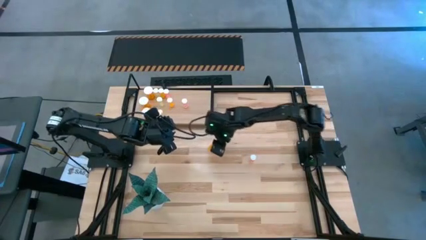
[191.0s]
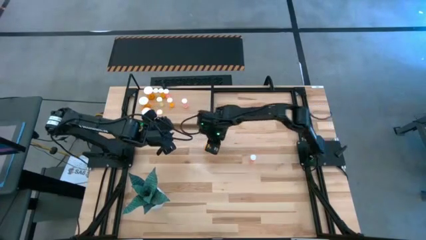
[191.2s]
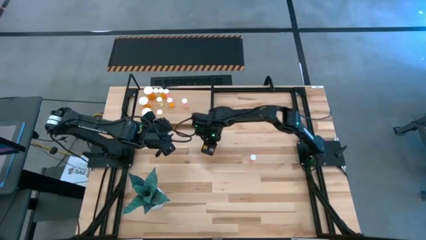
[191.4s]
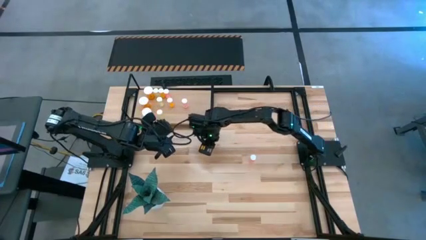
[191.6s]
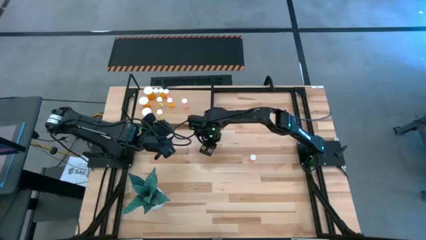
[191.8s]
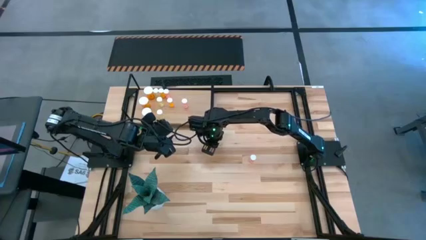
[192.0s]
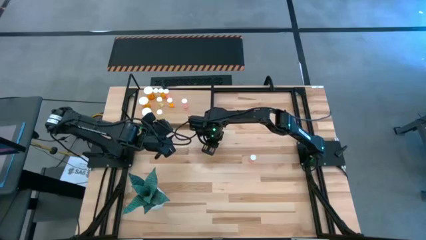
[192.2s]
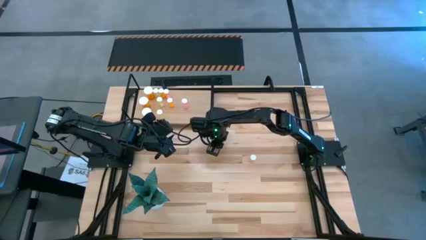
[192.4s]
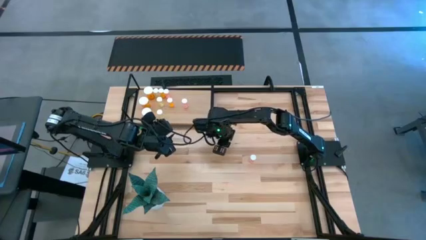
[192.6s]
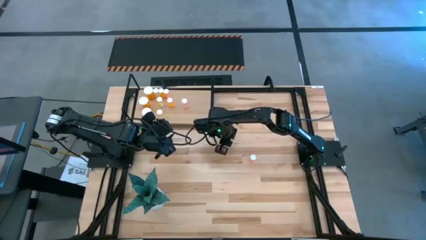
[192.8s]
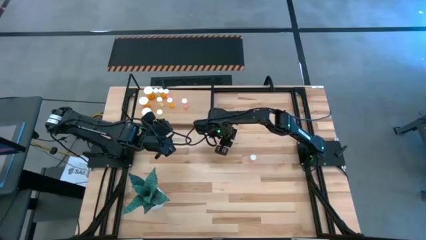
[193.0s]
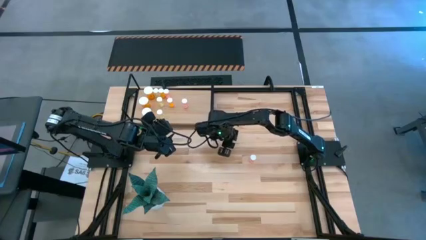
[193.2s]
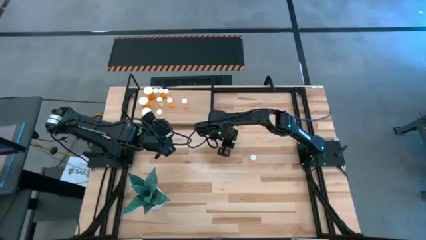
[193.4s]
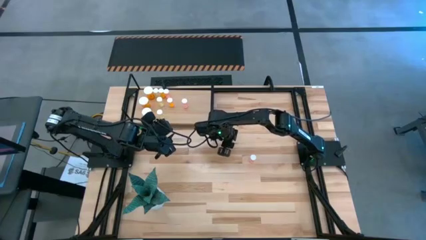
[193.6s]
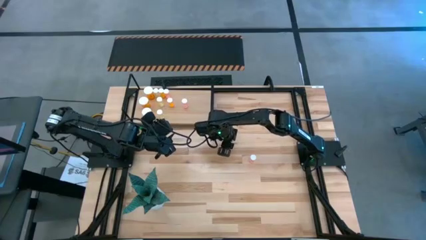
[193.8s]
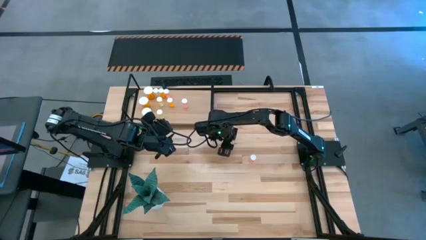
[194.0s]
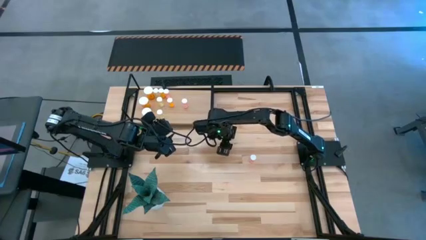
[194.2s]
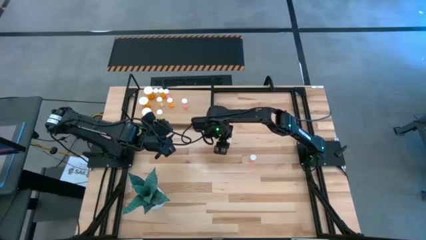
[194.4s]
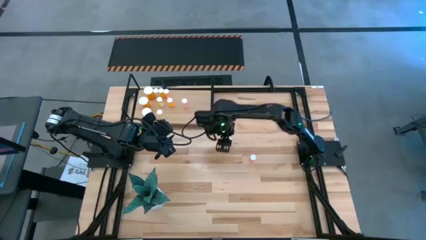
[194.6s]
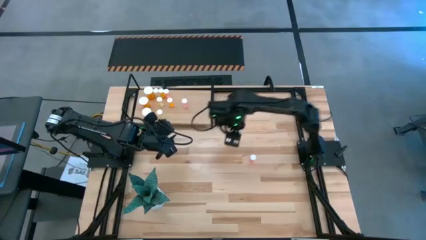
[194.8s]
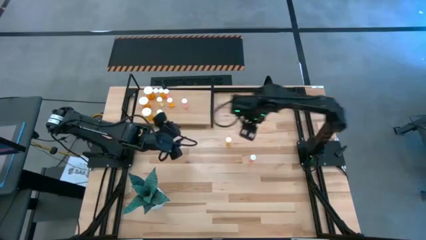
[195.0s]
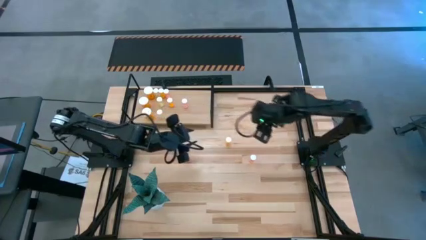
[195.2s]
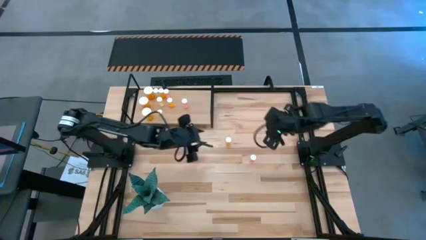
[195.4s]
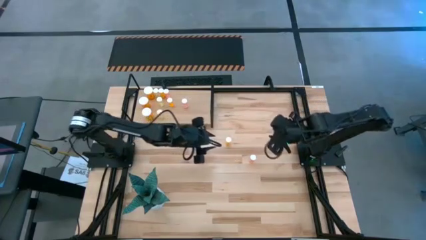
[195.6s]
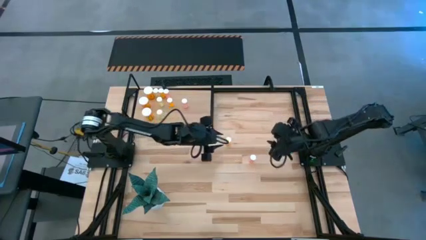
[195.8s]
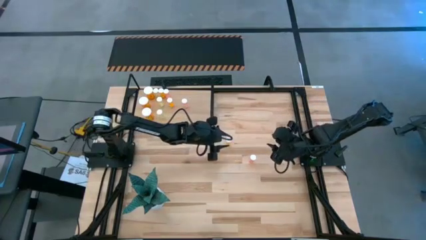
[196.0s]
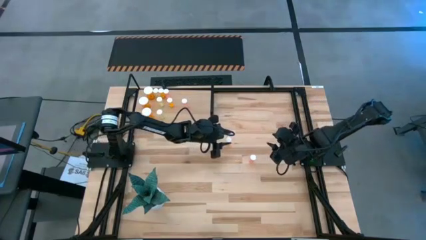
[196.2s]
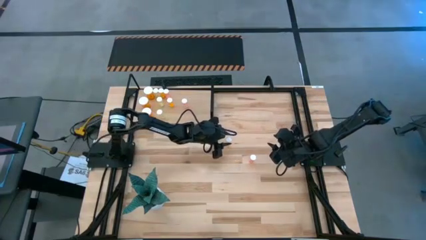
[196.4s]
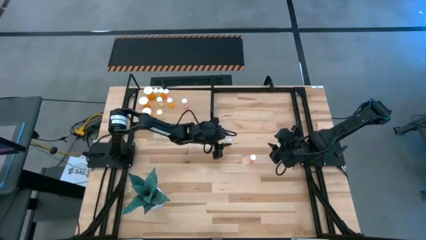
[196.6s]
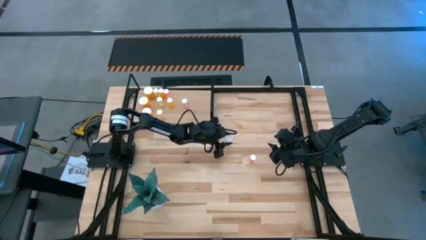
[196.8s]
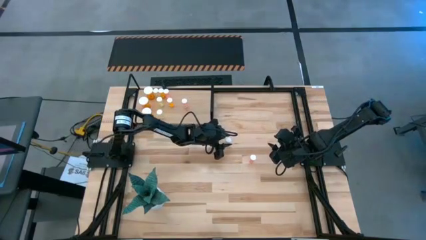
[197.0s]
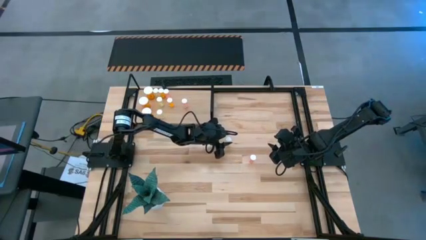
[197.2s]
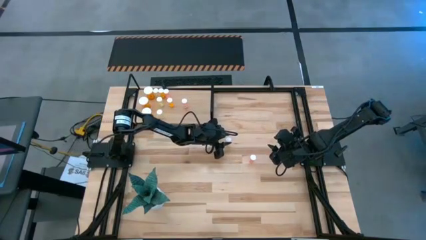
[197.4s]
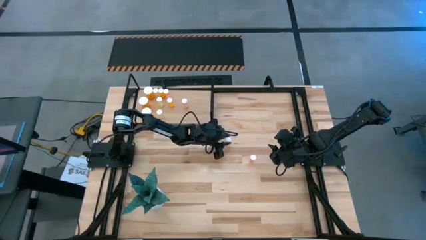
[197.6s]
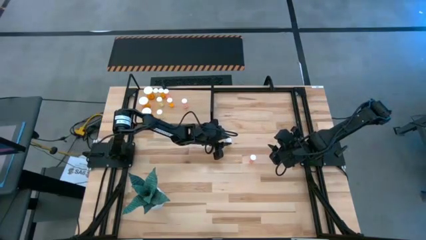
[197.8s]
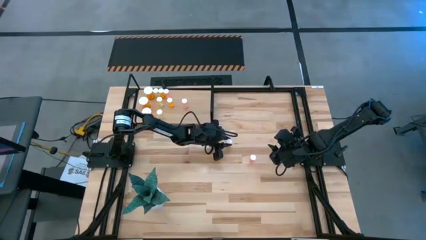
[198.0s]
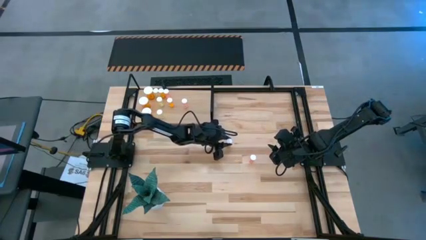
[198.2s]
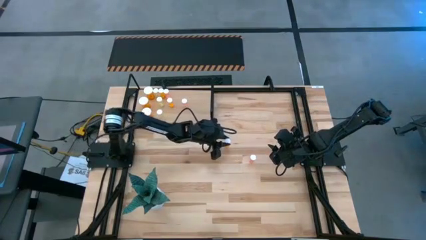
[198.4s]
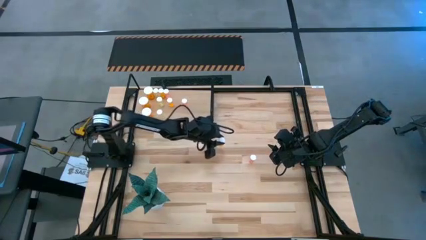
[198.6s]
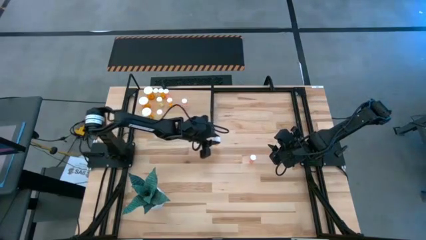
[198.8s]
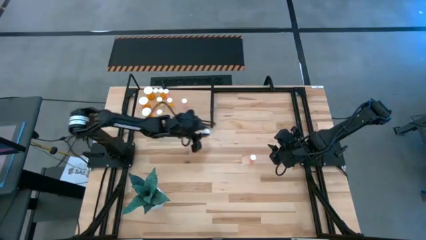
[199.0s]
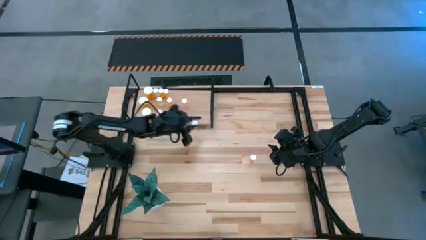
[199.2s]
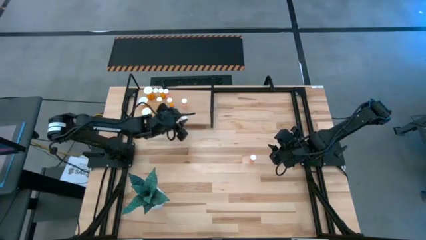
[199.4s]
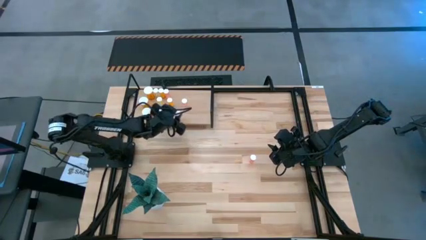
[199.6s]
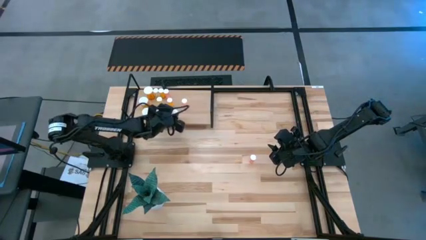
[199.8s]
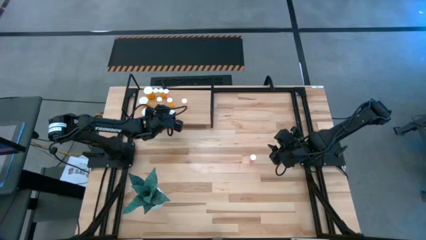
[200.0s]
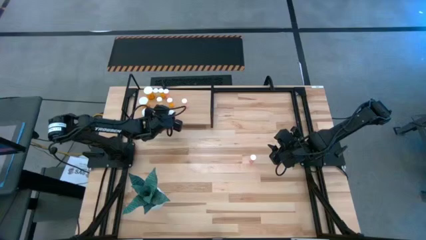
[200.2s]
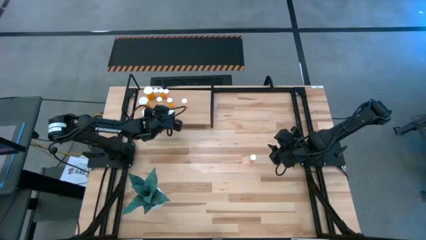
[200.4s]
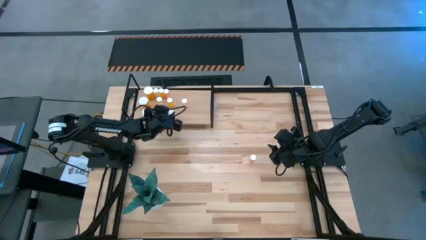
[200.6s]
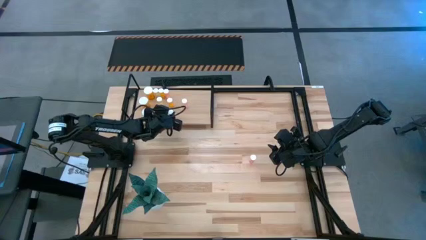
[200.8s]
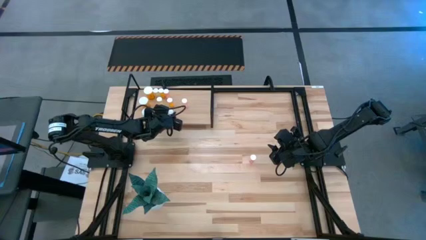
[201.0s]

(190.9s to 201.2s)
Task: Pick and place medicine bottles onto shelf by color
Put the small orange pill bottle aligned with the other orange pill bottle on the shelf
